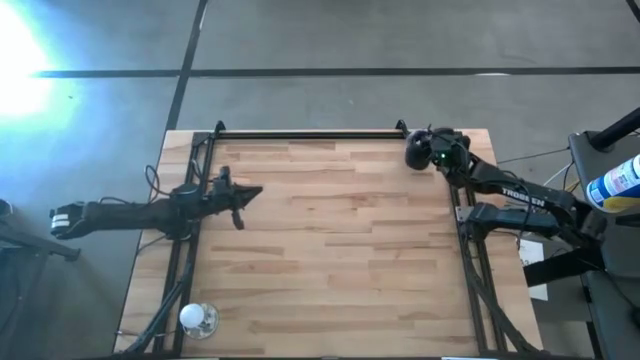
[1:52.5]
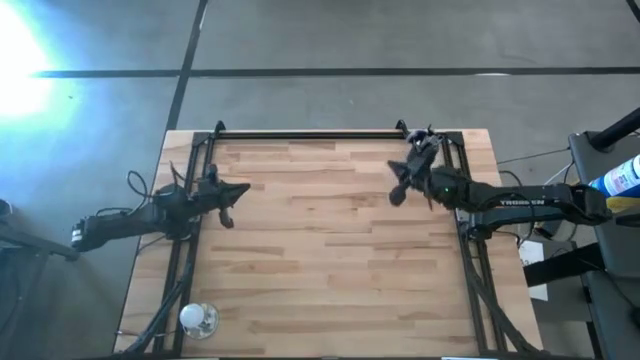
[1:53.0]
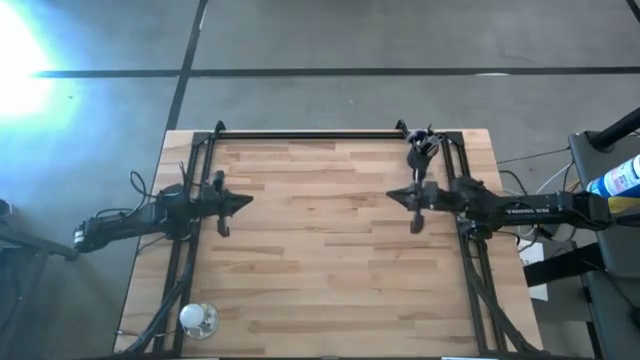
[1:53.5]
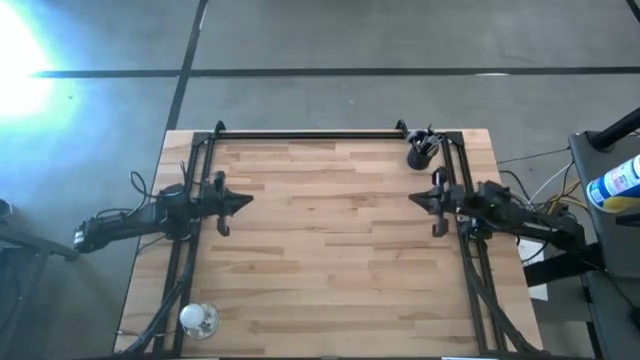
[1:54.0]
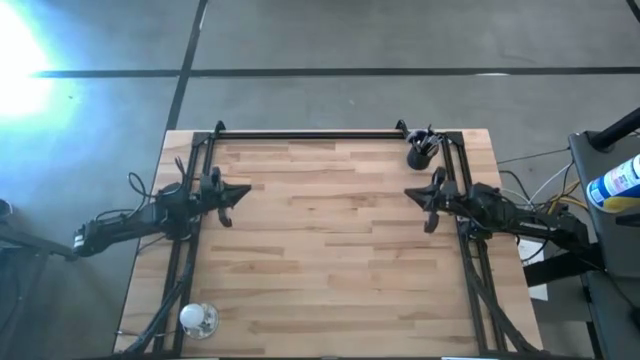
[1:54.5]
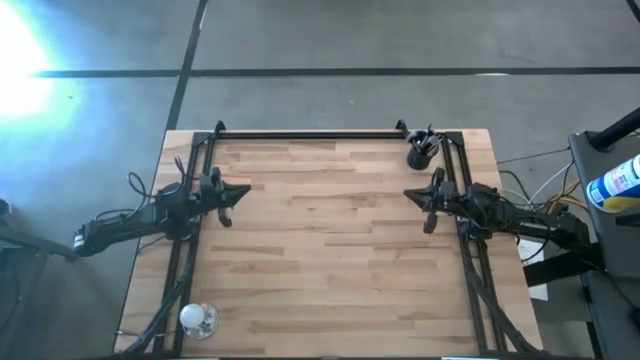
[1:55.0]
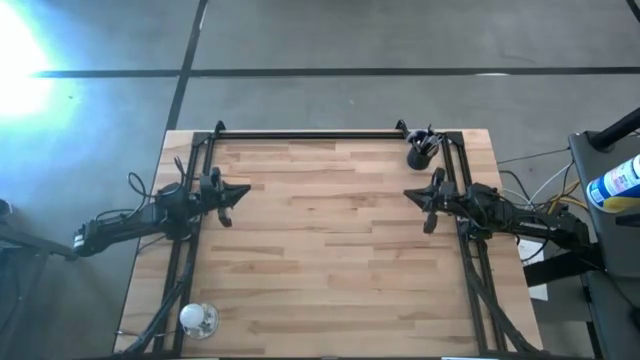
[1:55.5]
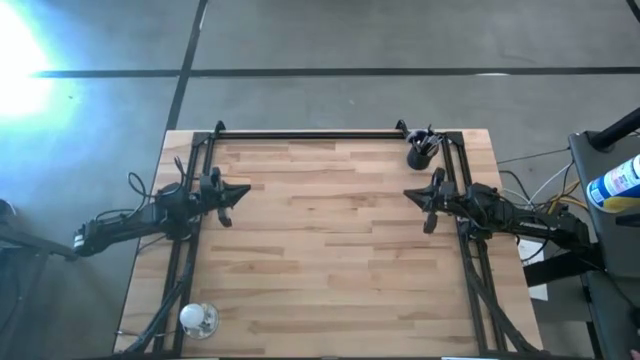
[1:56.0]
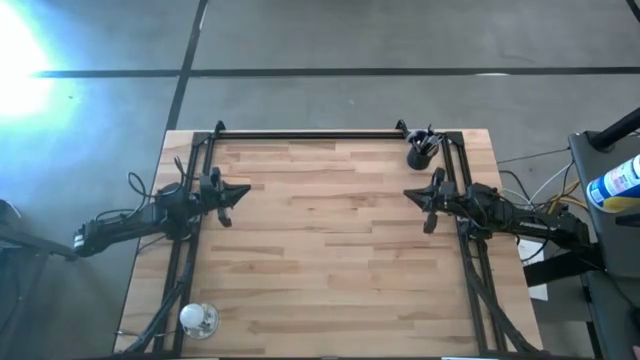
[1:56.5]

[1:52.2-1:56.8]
Task: Put items in baskets/containers
Return to Home Position

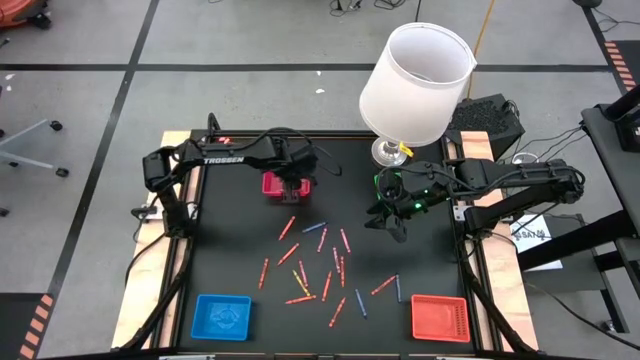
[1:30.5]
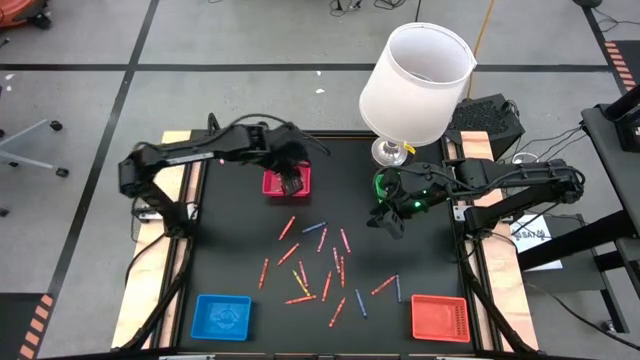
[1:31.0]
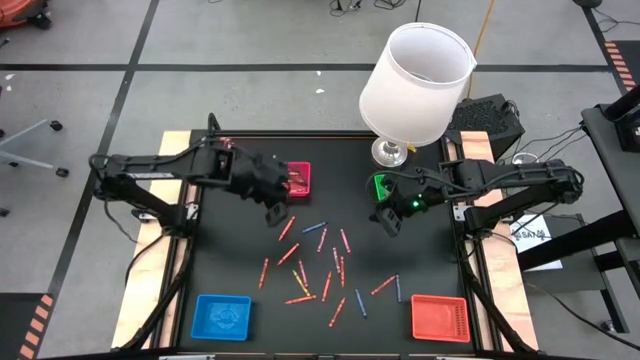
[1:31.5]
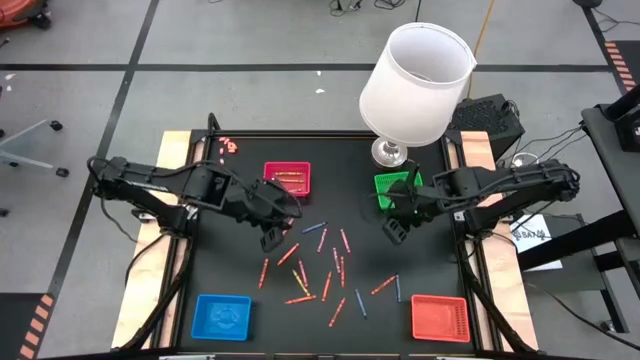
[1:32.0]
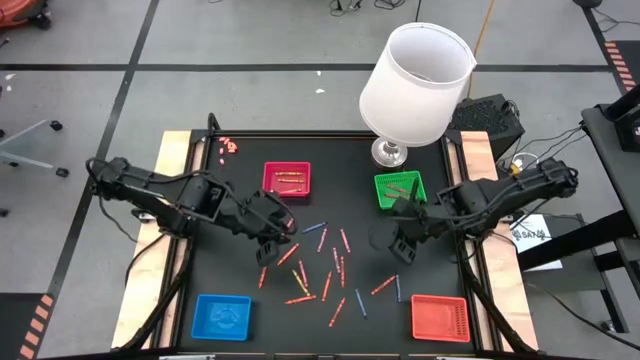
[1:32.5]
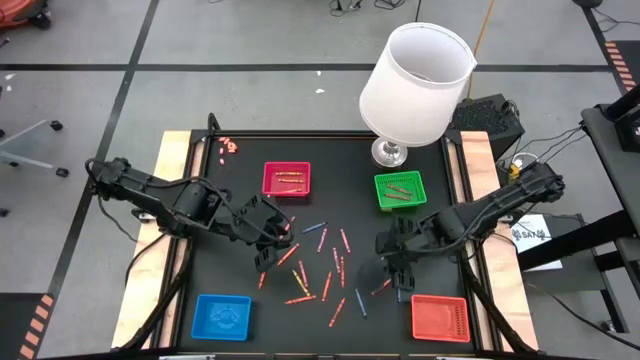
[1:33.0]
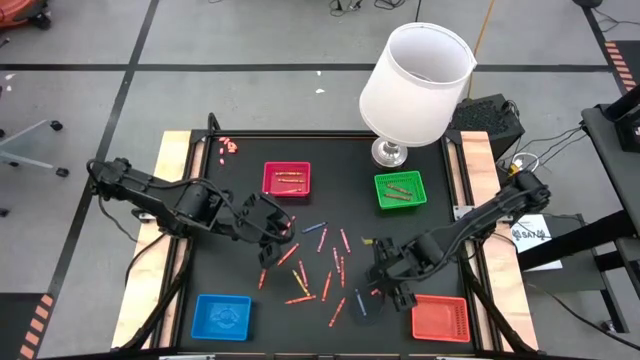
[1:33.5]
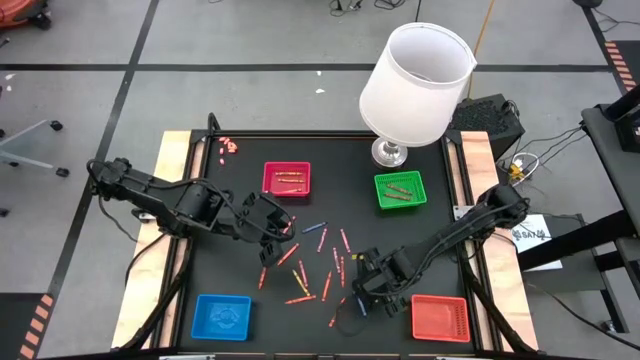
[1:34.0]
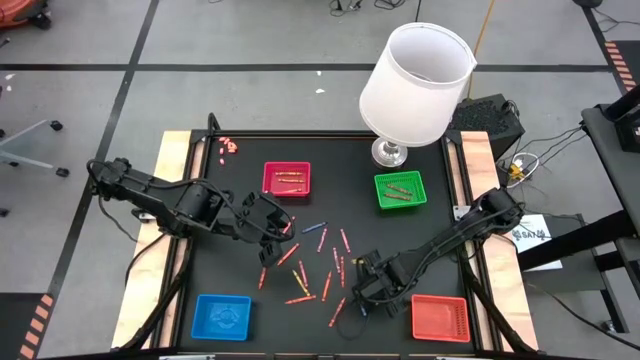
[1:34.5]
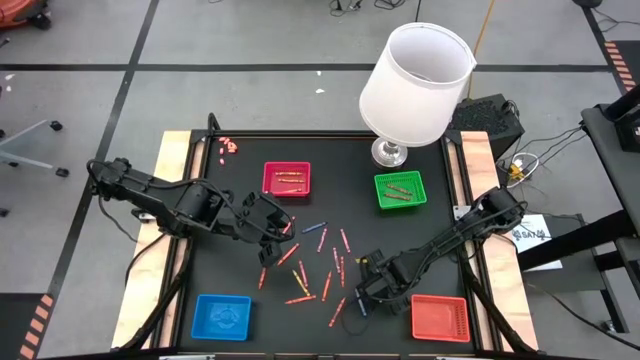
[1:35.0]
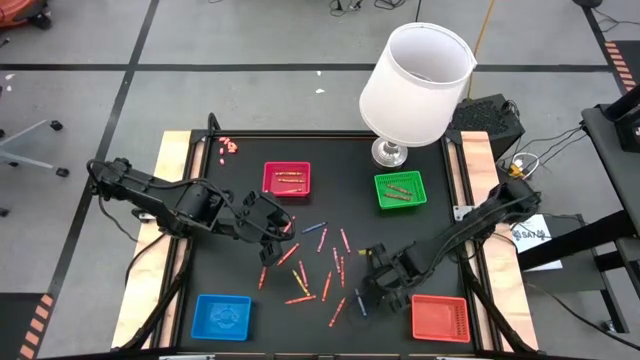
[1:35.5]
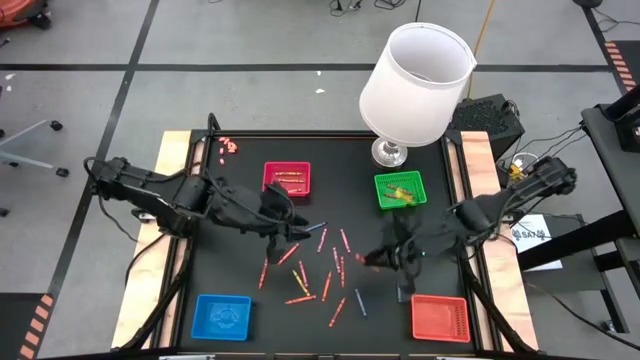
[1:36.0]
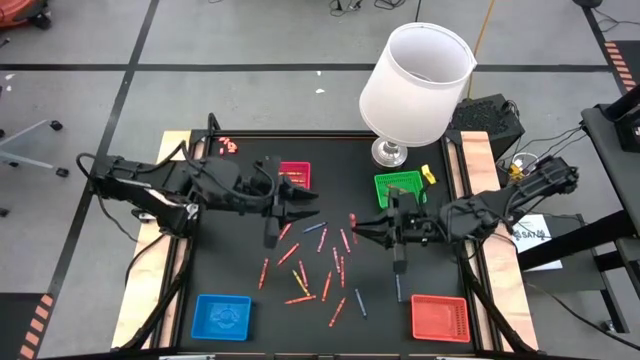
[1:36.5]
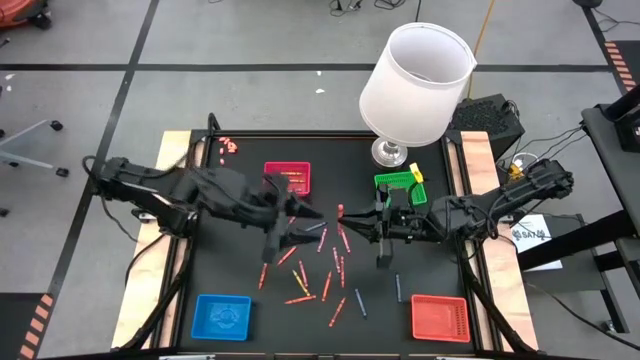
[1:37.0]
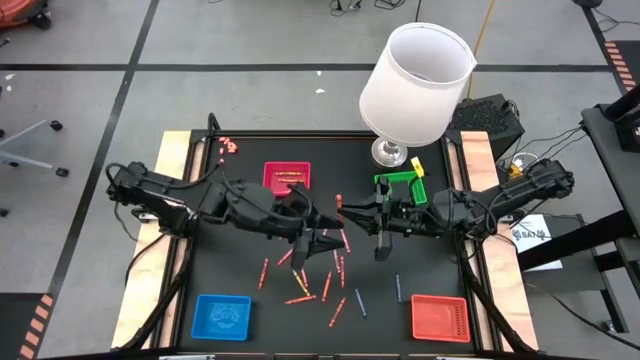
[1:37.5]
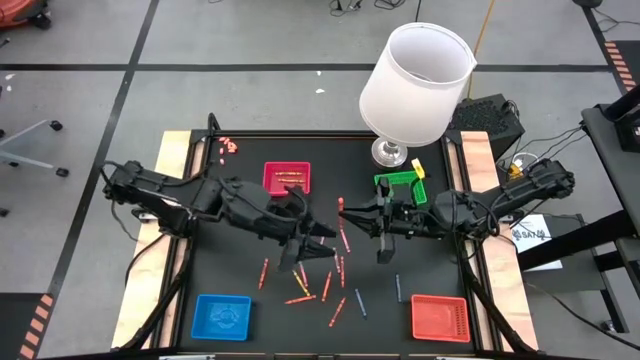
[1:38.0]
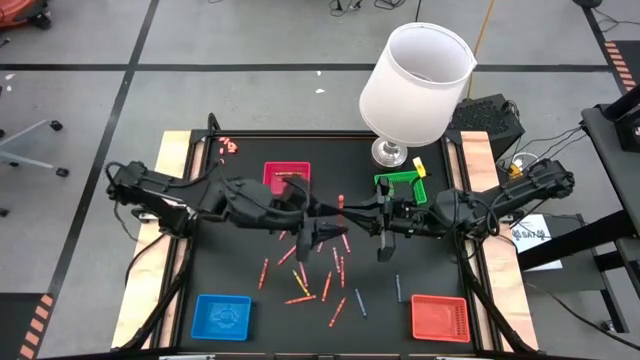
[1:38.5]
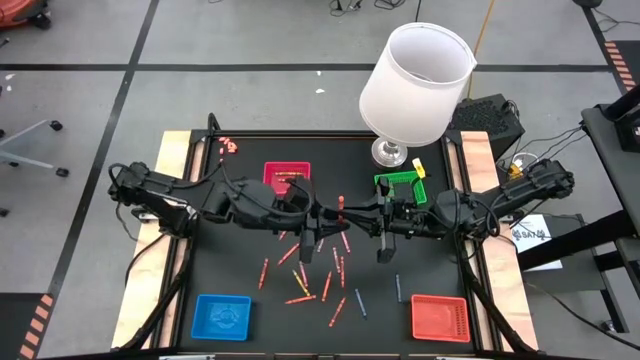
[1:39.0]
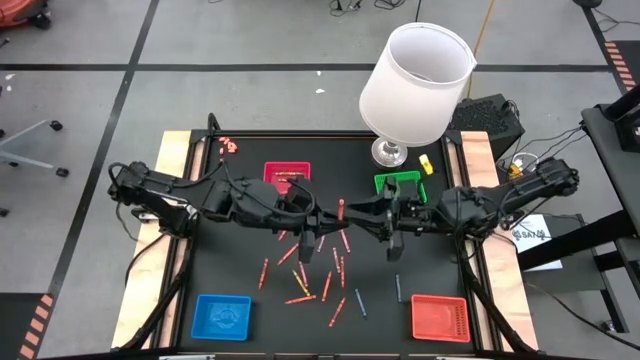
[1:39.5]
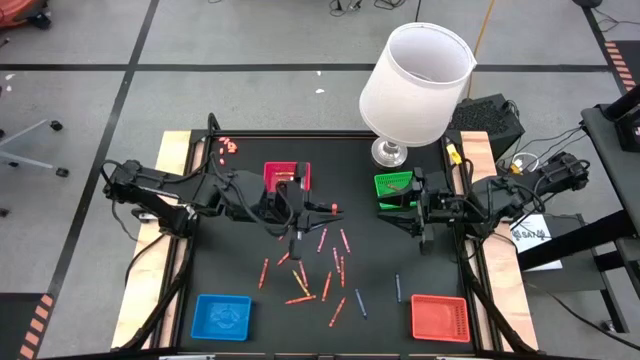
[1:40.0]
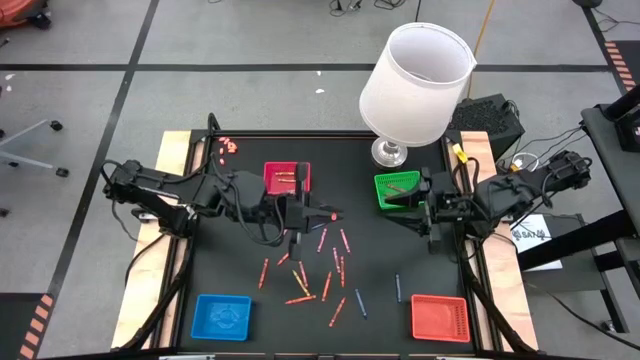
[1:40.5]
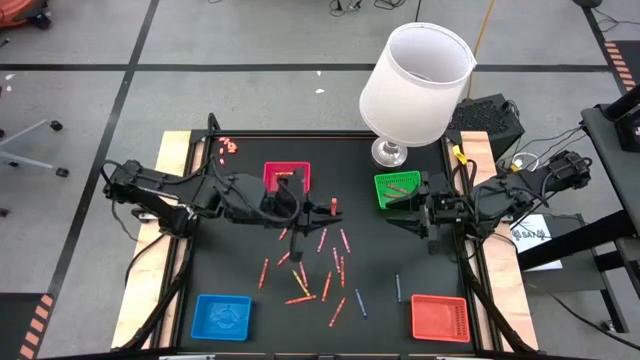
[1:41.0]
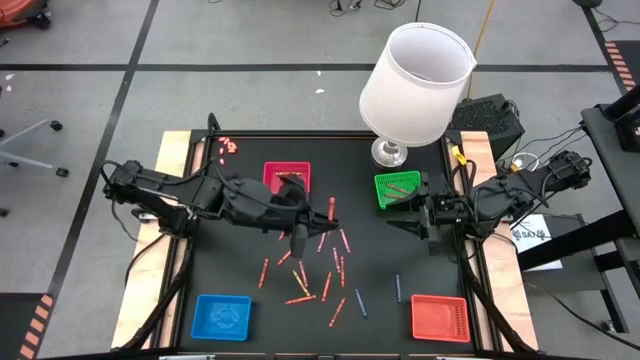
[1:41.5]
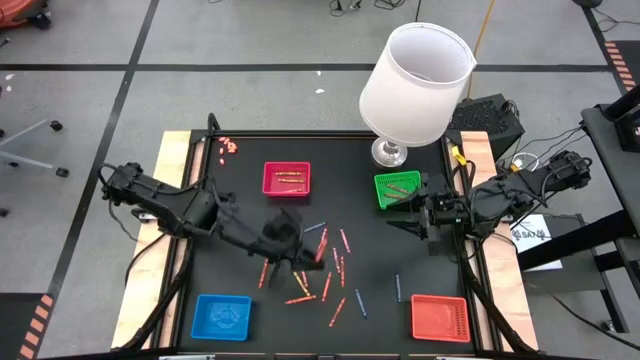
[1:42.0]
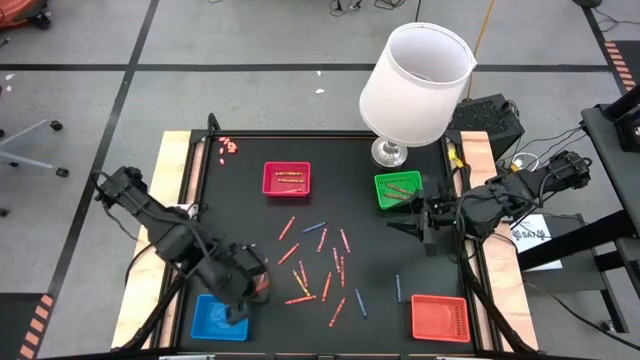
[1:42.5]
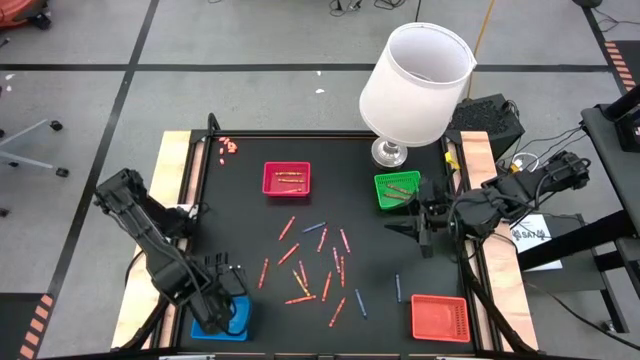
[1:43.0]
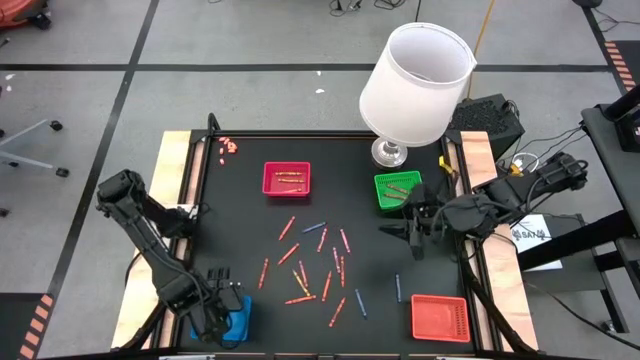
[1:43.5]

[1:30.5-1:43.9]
Task: Sort crayons
Put the orange crayon into the blue basket

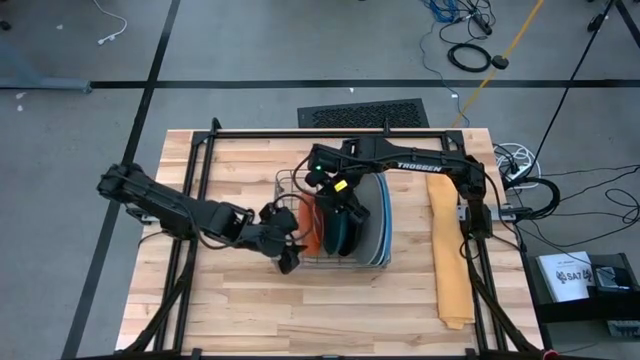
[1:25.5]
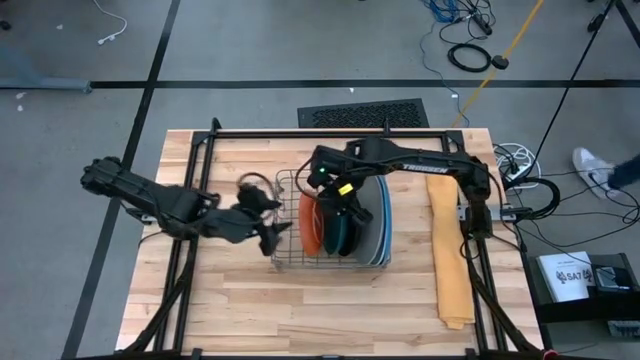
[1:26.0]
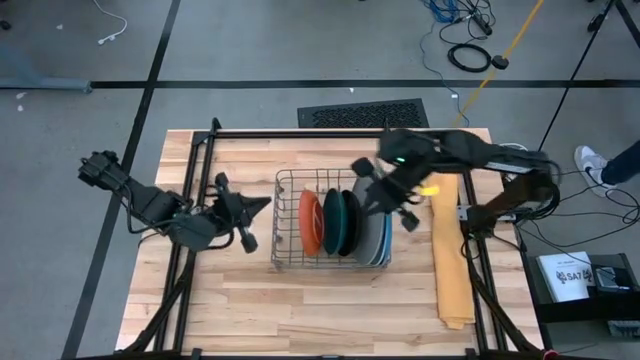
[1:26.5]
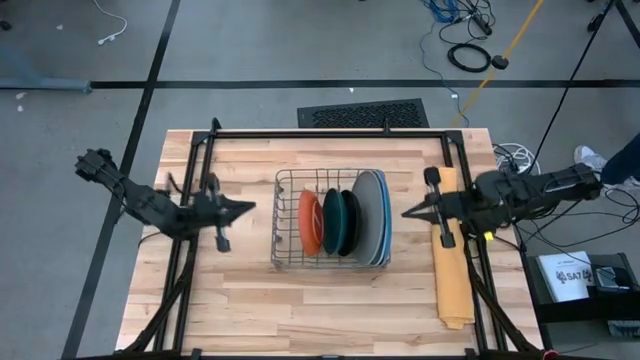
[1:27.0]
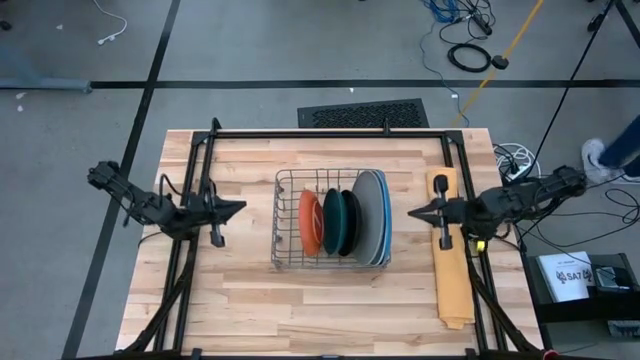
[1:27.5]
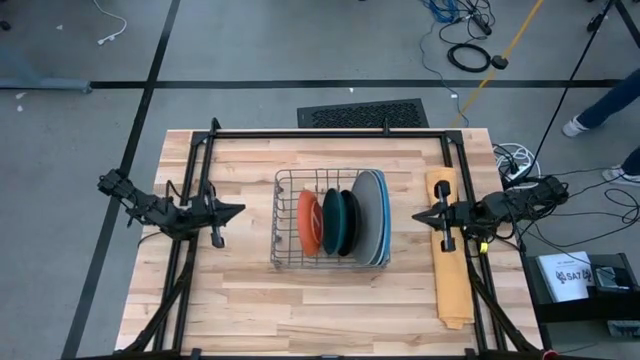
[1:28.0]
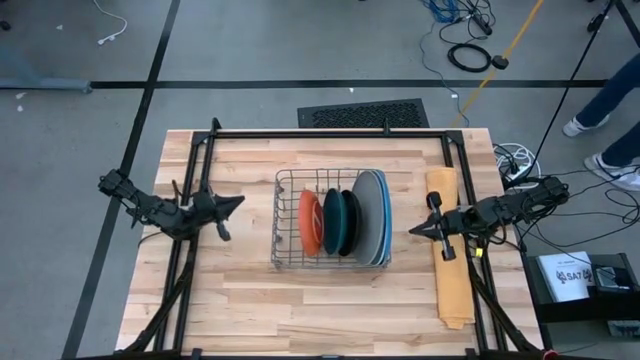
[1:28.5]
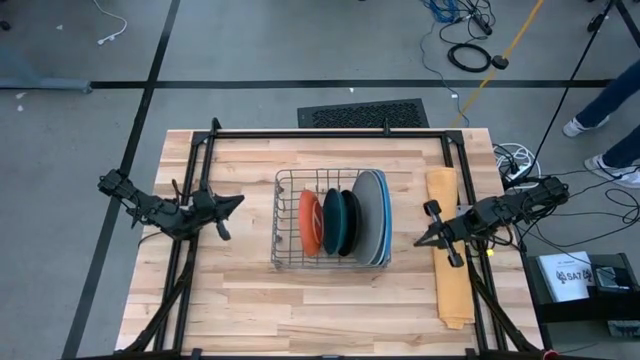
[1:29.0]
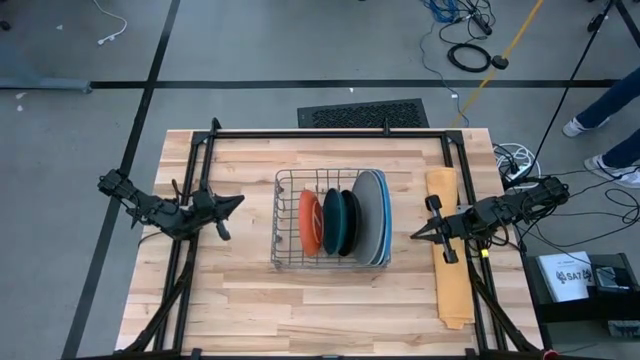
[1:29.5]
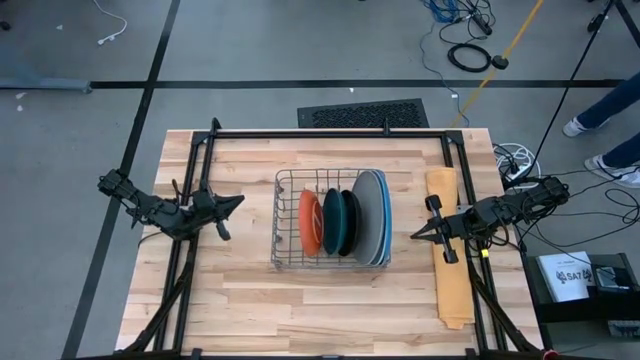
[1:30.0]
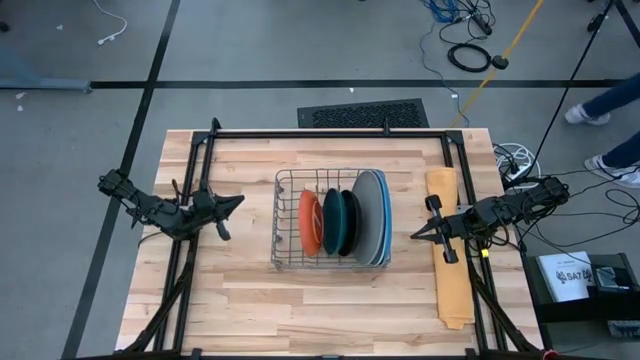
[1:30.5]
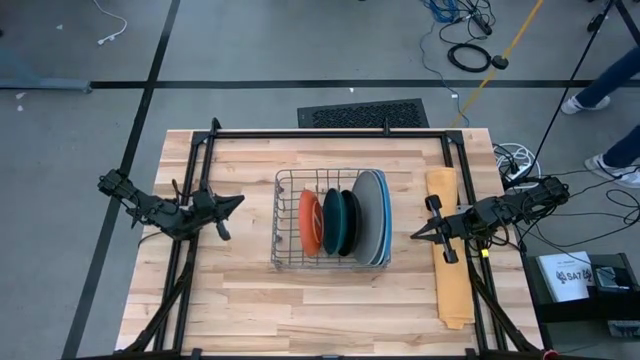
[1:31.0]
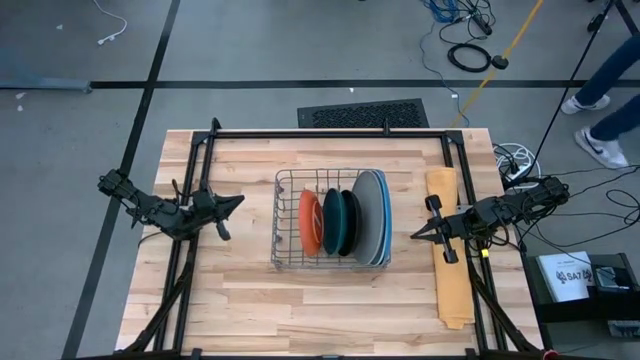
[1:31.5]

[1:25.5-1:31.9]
Task: Sort dishes
Return to Home Position
